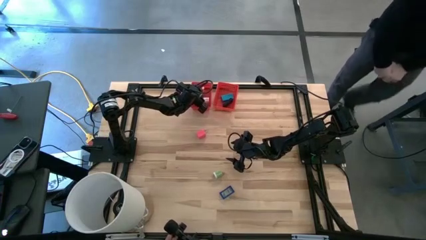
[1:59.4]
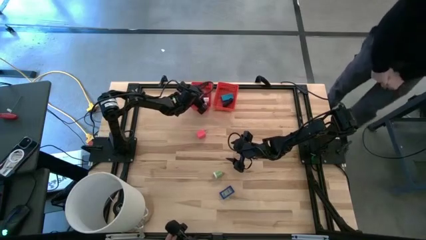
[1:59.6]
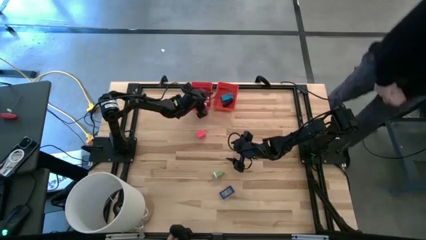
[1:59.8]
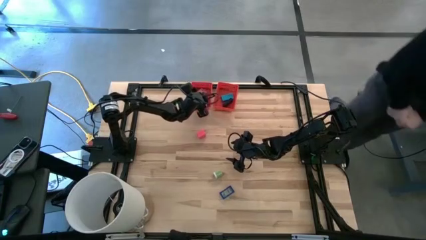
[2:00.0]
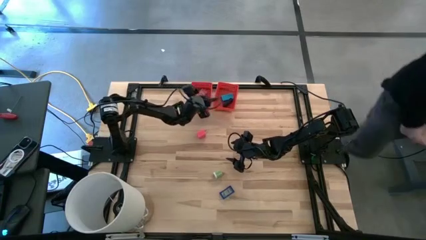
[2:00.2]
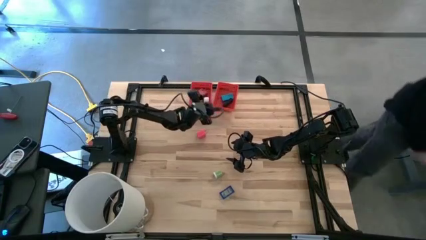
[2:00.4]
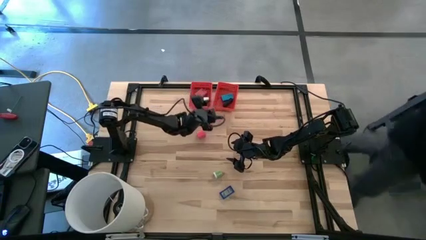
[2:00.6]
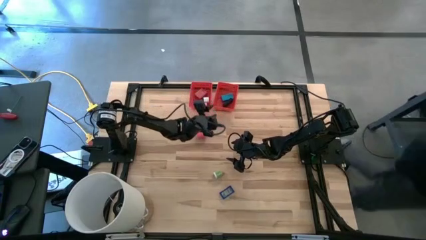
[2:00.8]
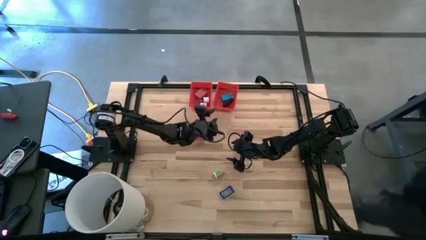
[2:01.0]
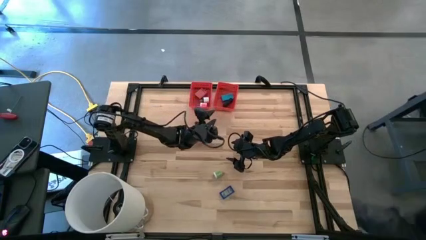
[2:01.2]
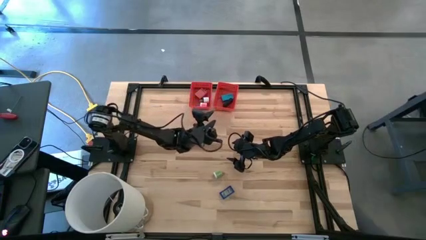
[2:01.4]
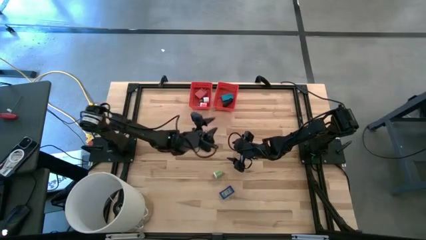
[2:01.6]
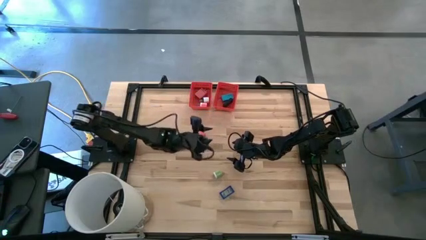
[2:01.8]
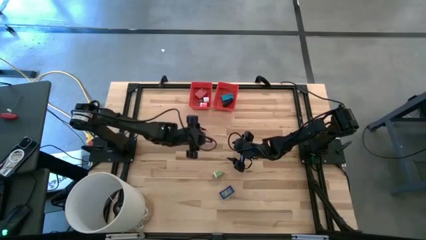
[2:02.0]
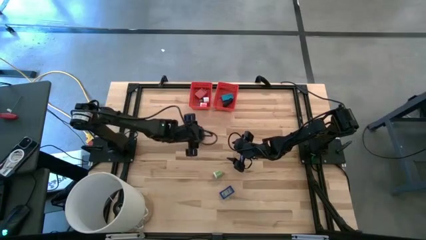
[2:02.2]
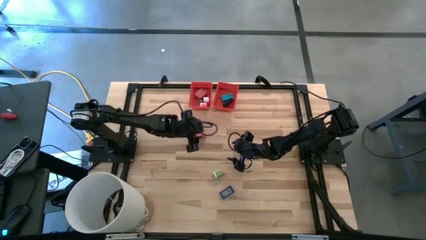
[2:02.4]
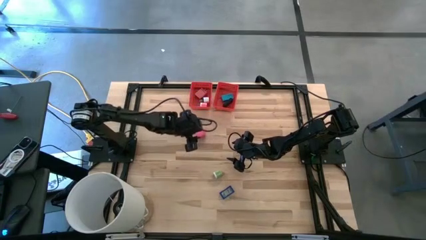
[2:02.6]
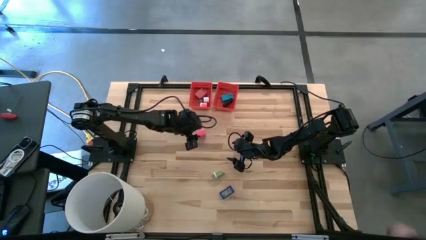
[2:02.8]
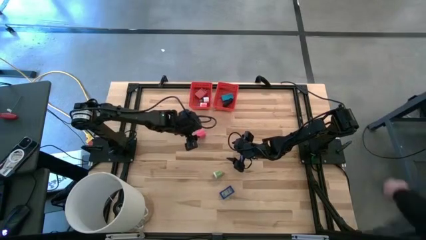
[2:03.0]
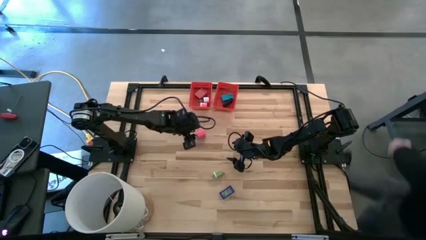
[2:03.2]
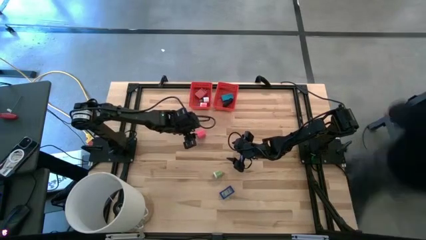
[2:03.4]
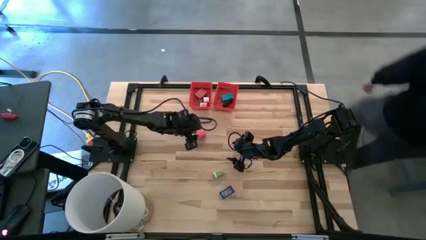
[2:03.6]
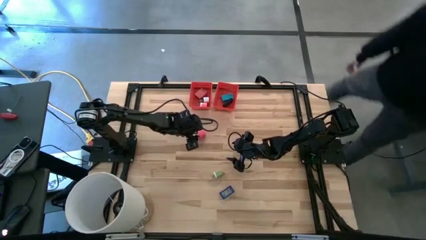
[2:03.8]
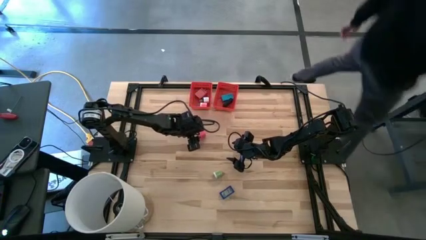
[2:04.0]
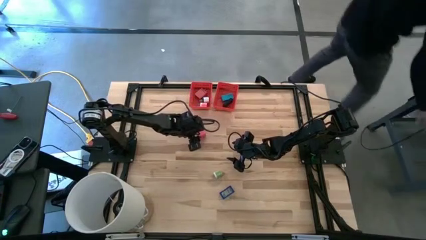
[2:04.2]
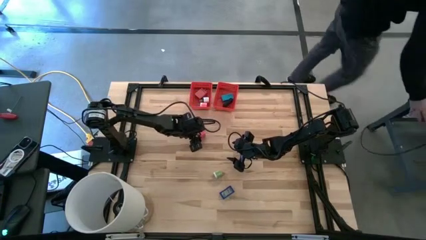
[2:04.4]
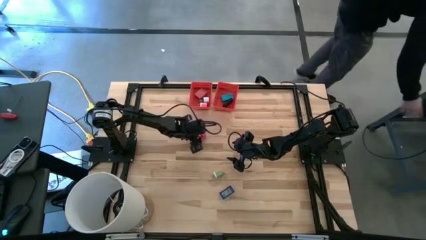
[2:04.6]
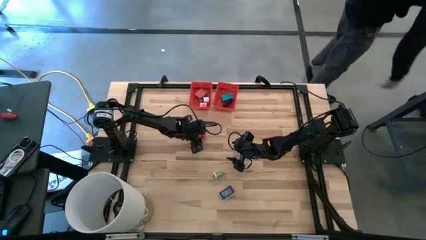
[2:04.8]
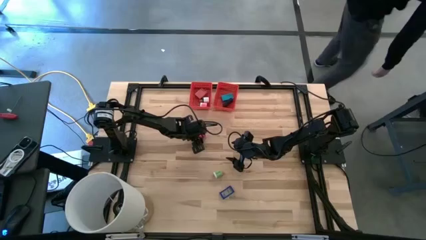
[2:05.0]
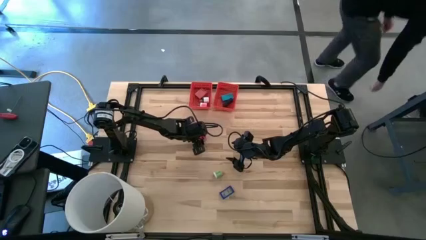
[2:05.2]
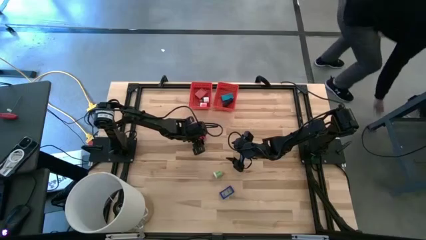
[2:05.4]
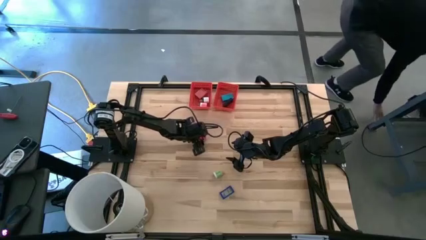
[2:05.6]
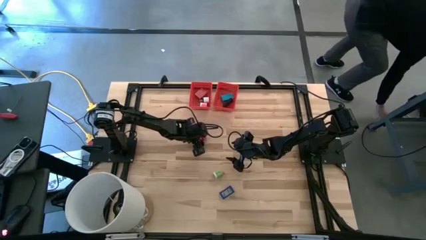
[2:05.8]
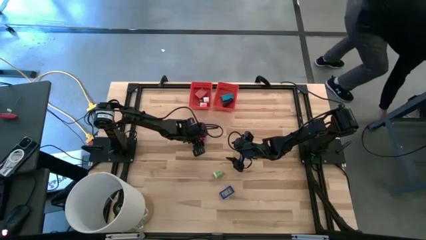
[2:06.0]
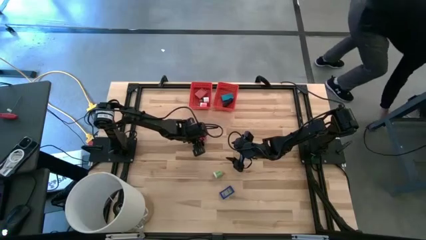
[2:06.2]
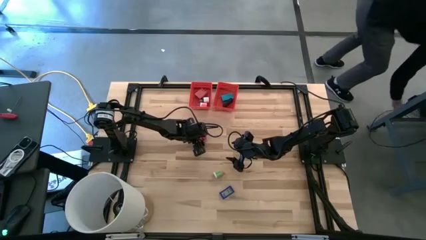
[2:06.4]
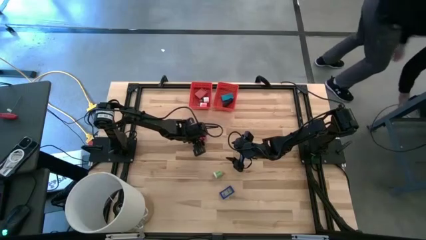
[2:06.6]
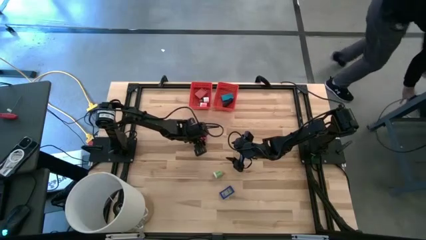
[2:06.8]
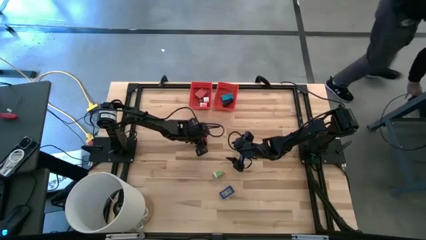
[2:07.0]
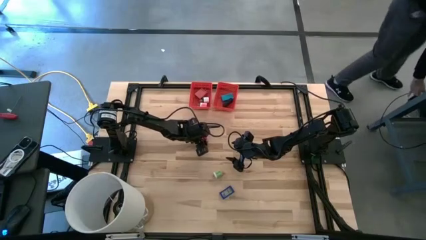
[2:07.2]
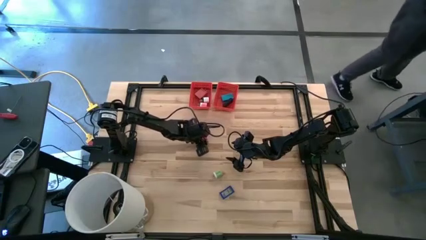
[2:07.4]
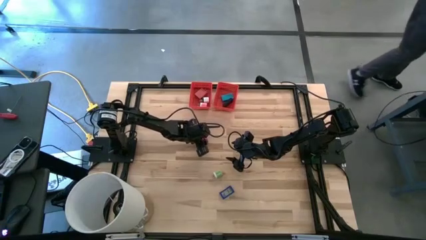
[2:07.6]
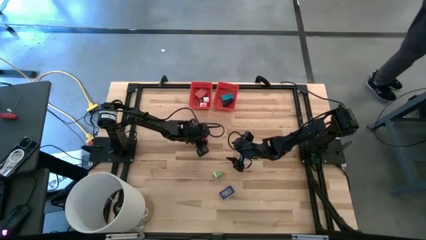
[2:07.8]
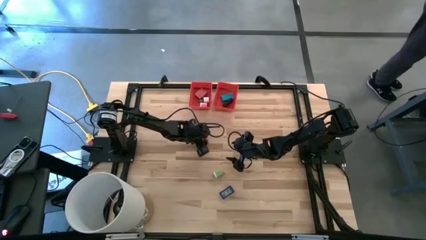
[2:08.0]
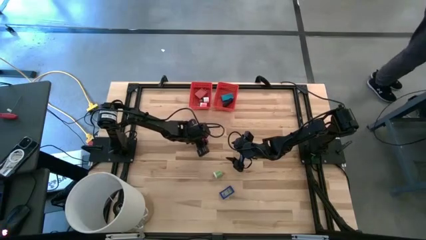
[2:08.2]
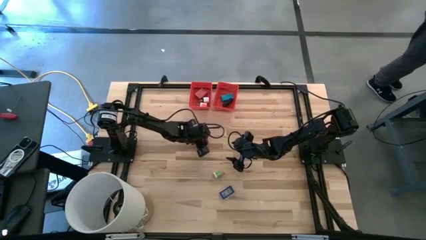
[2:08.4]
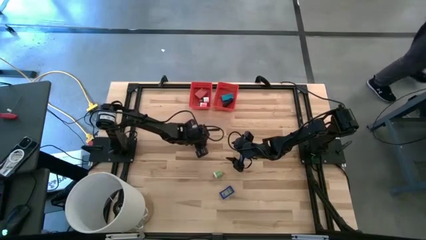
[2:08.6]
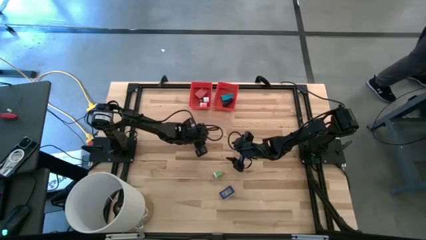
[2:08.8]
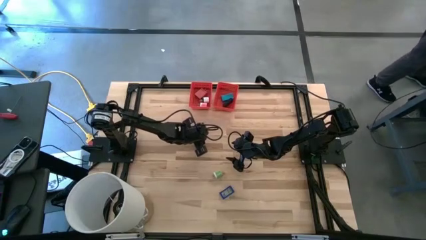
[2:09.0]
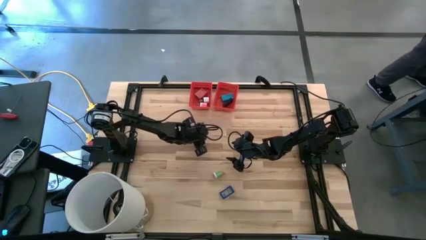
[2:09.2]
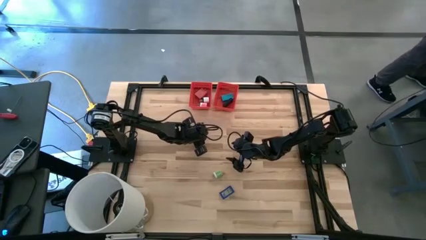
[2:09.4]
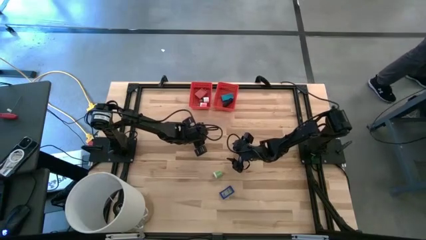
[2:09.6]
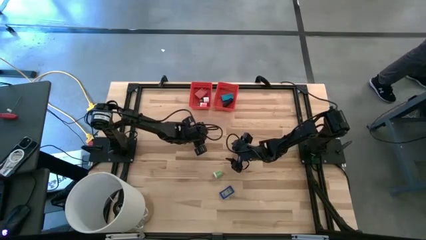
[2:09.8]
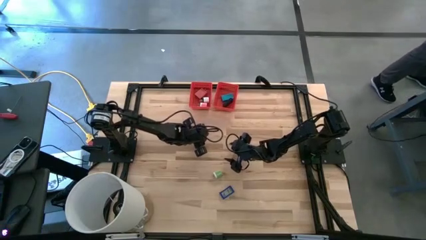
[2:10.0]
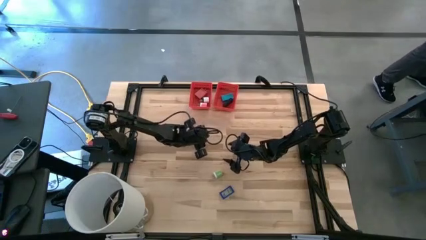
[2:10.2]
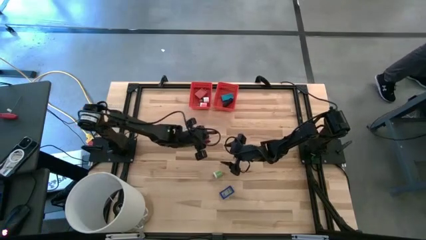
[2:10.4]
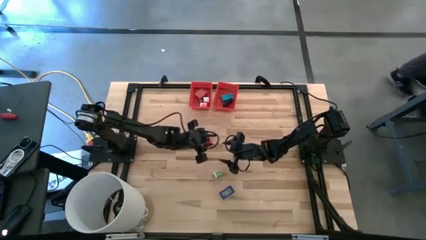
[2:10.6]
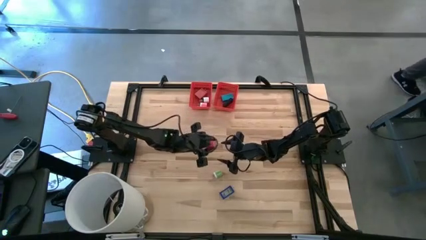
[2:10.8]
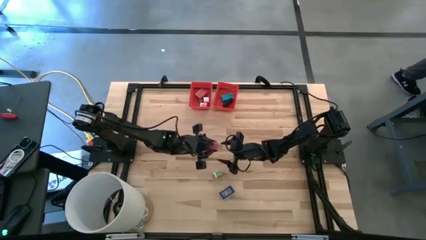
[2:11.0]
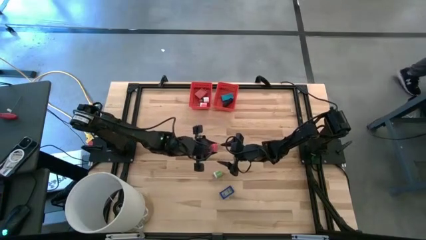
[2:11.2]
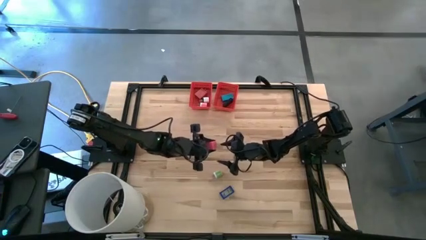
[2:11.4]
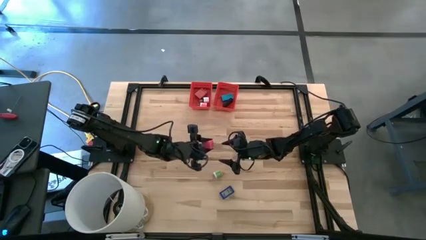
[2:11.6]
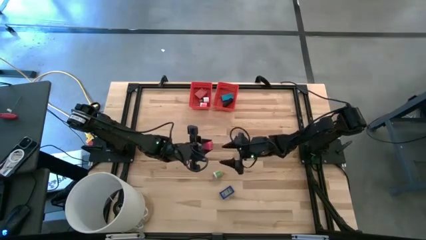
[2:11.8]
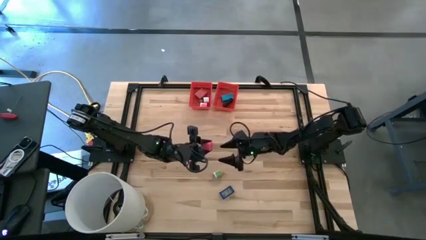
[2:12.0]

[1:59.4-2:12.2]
Task: Pick & Place Office items
Put the pink charger adapter into the left red basket

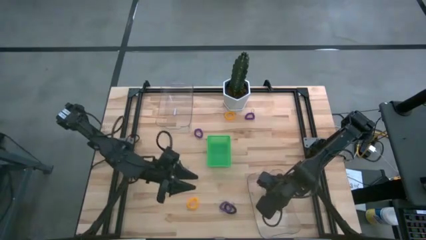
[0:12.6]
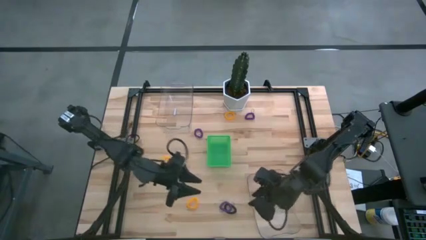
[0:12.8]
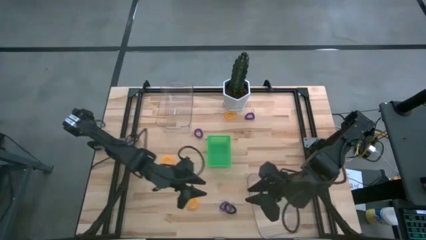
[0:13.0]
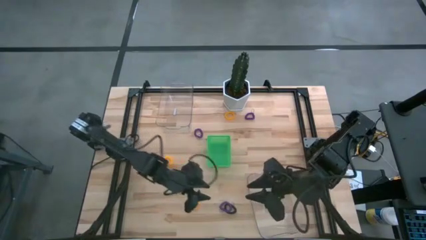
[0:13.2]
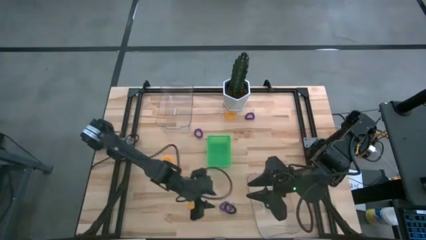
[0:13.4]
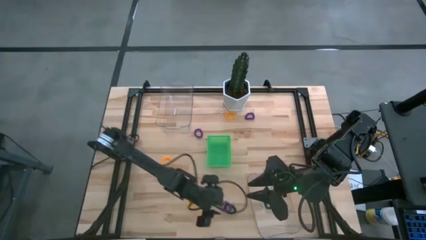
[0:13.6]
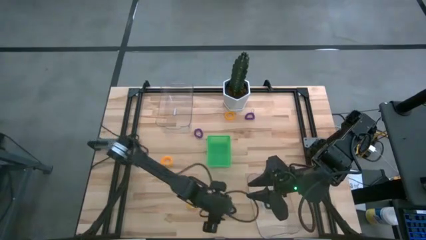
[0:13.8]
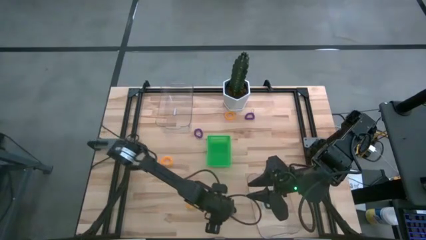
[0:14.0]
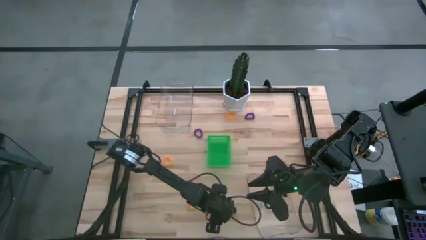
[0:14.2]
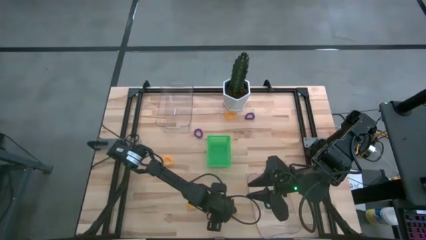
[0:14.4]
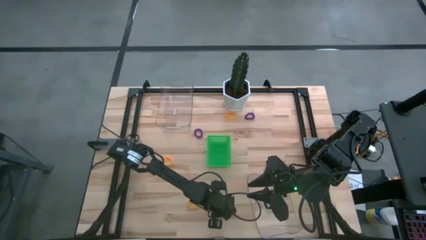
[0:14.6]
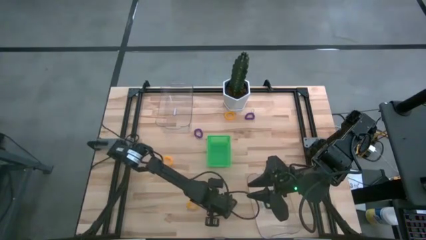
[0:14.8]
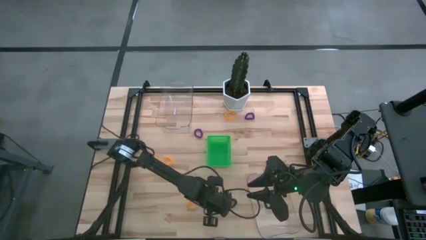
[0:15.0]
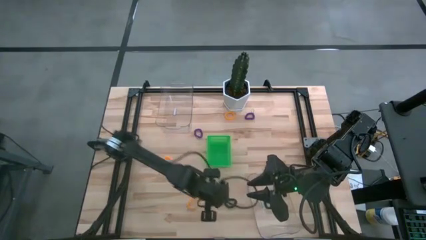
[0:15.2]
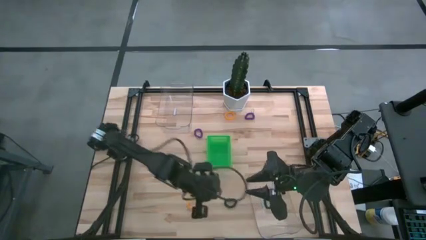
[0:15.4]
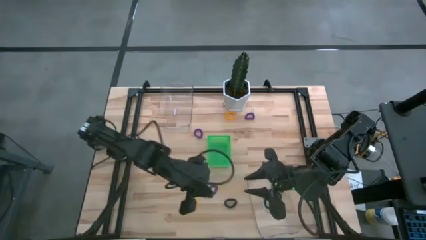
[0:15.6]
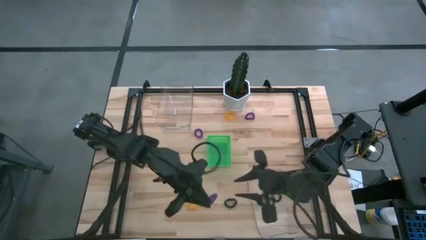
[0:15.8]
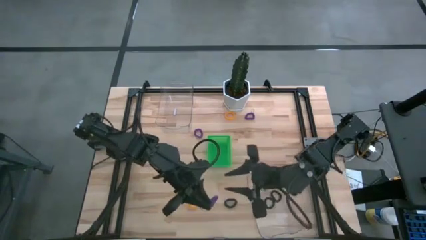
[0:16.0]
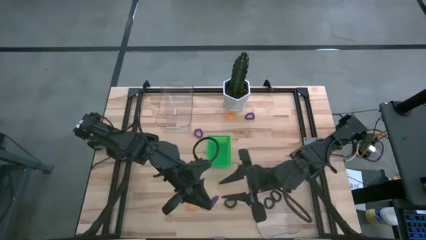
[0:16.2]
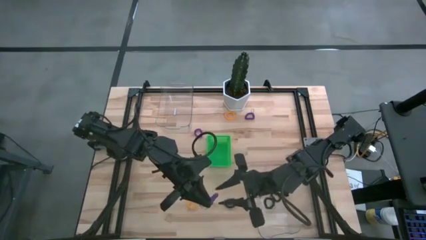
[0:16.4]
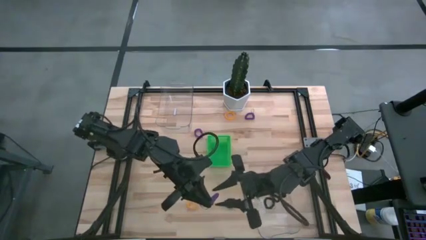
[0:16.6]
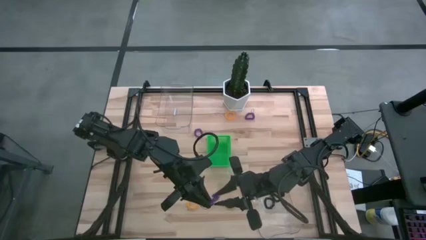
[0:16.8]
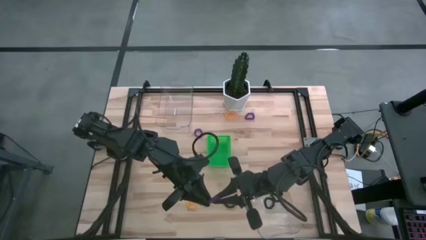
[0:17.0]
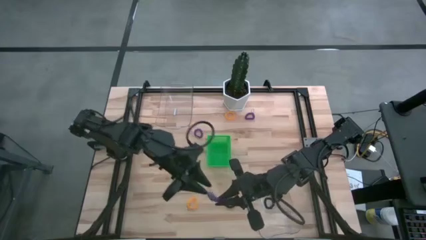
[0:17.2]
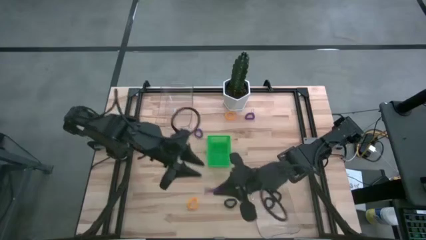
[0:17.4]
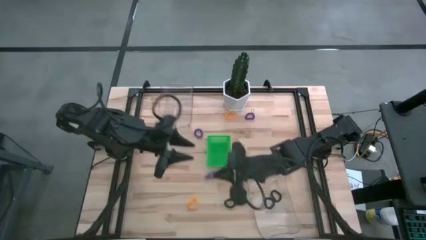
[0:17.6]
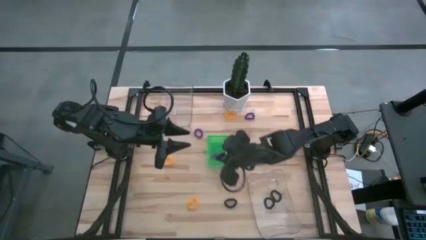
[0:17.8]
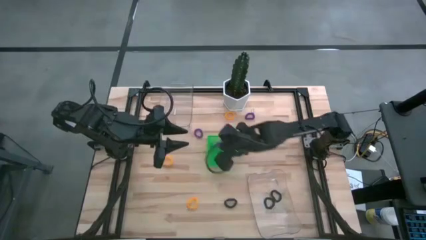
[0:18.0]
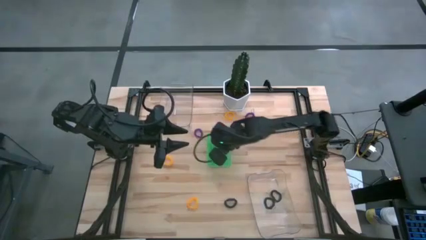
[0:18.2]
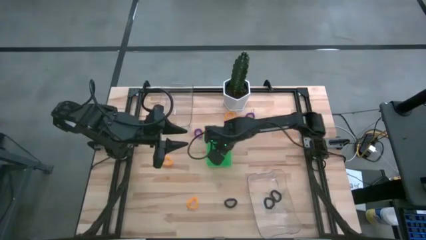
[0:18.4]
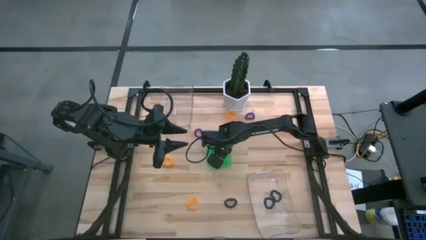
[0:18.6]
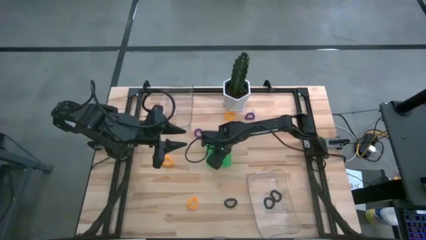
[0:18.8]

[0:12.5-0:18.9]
Task: Sort spring keychains
Put the bottom purple spring keychain into the green bin
